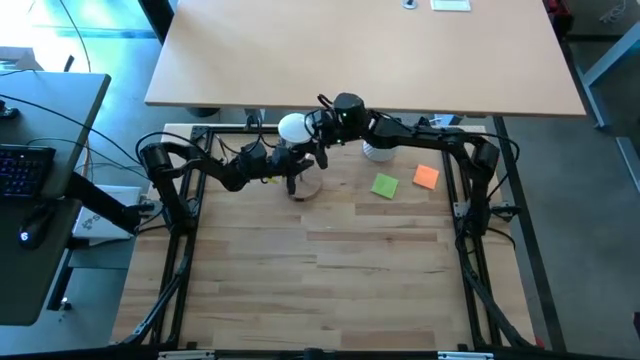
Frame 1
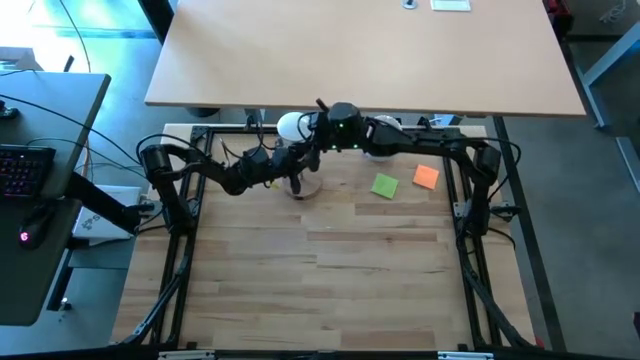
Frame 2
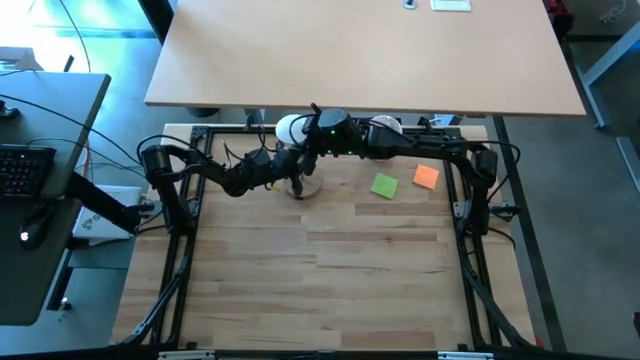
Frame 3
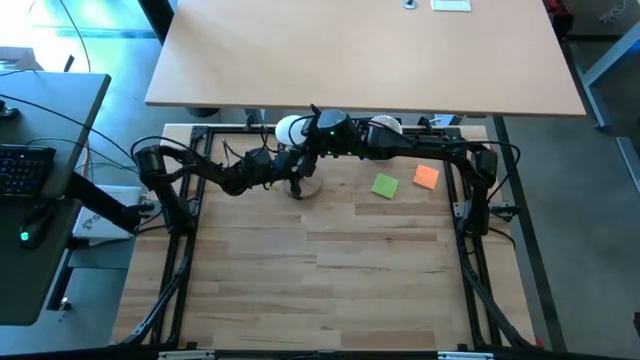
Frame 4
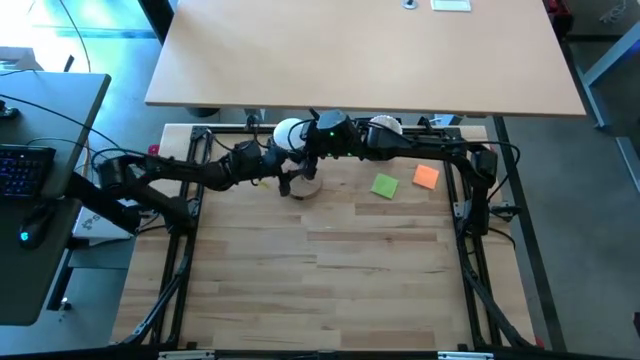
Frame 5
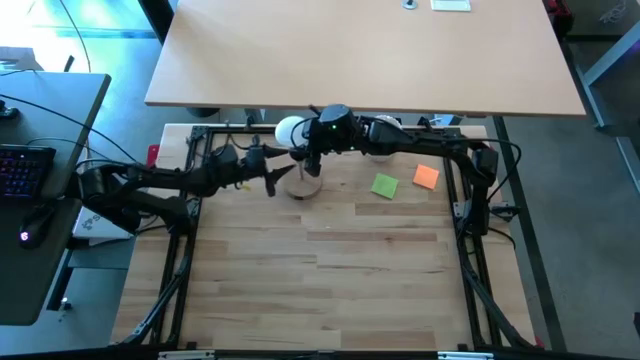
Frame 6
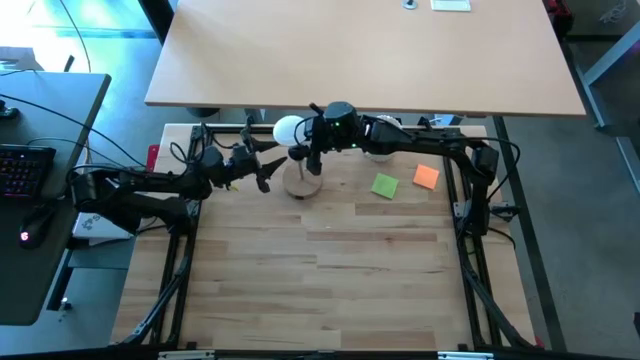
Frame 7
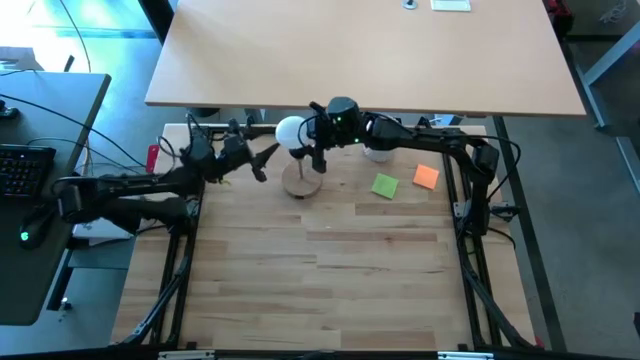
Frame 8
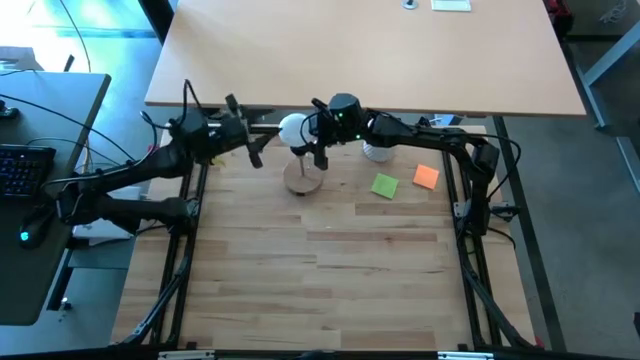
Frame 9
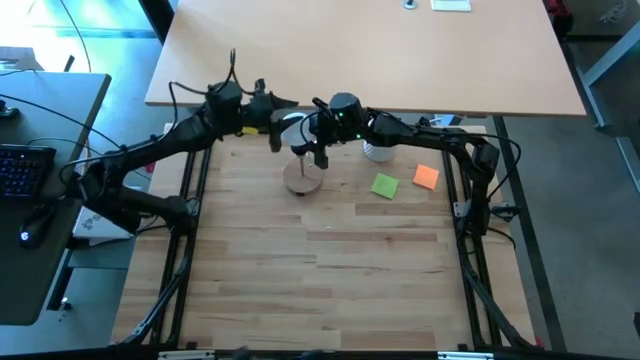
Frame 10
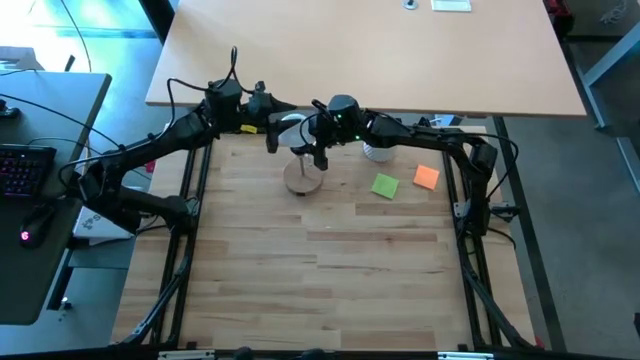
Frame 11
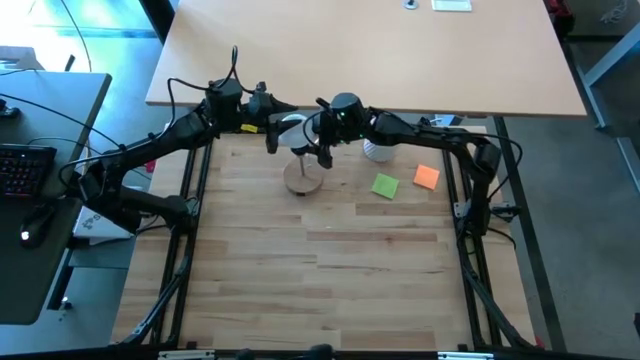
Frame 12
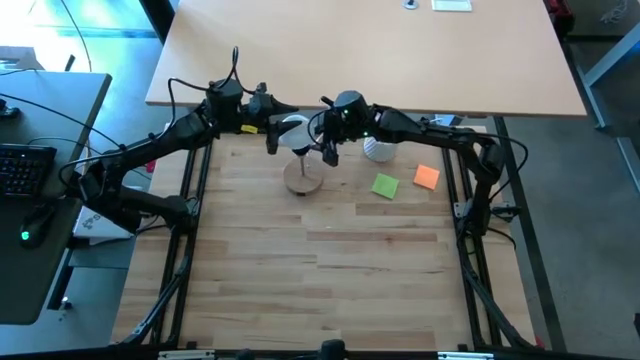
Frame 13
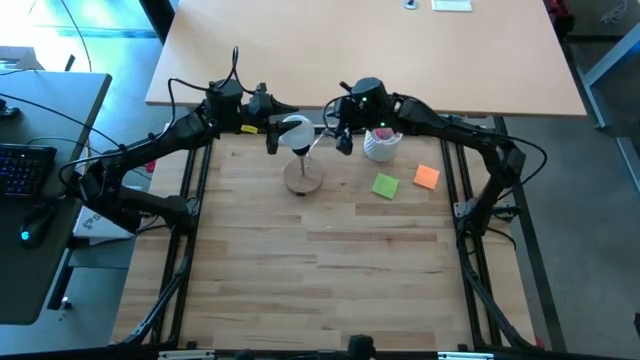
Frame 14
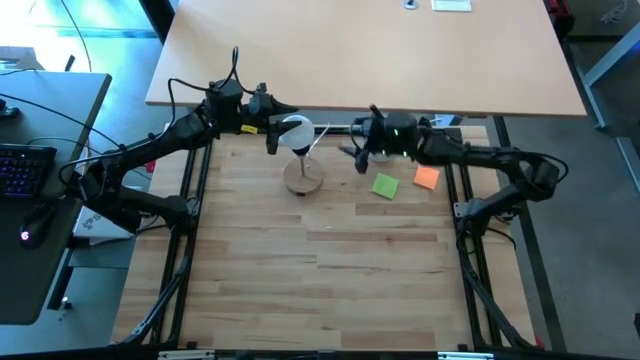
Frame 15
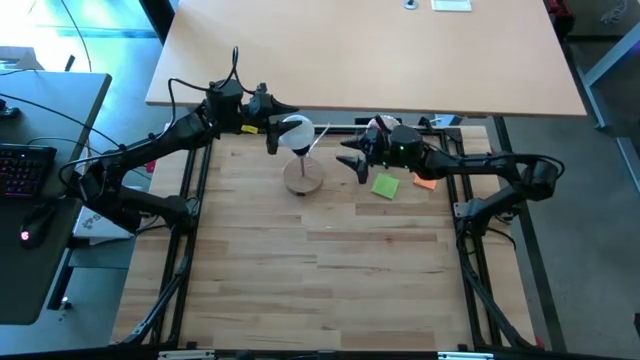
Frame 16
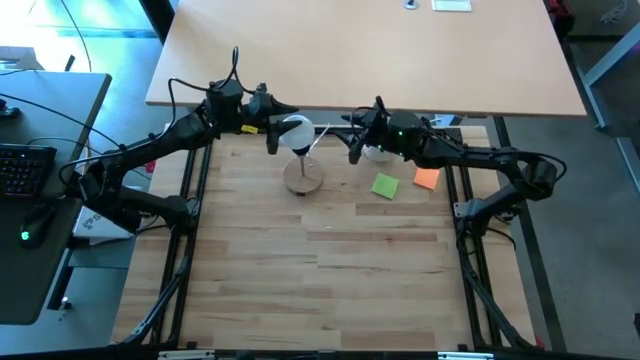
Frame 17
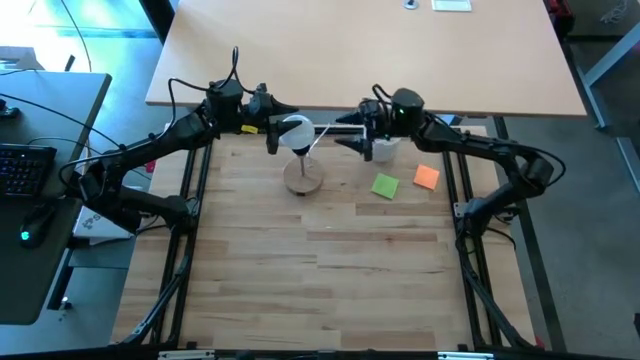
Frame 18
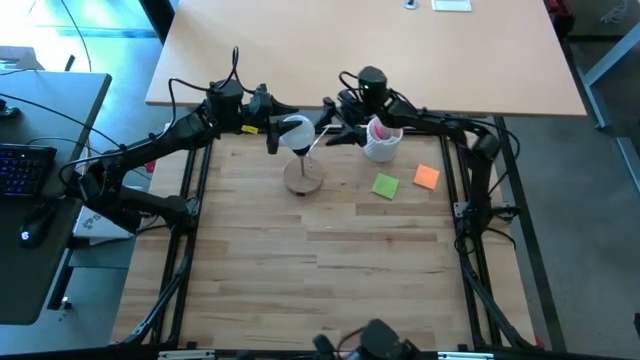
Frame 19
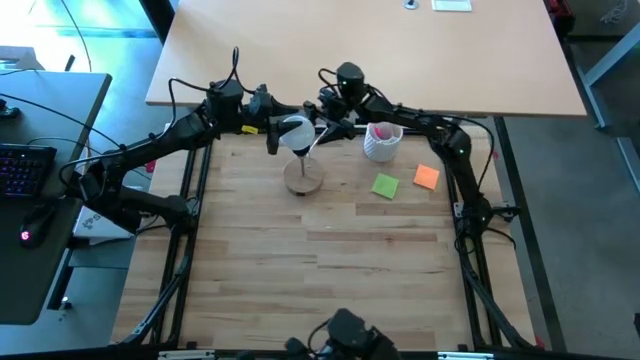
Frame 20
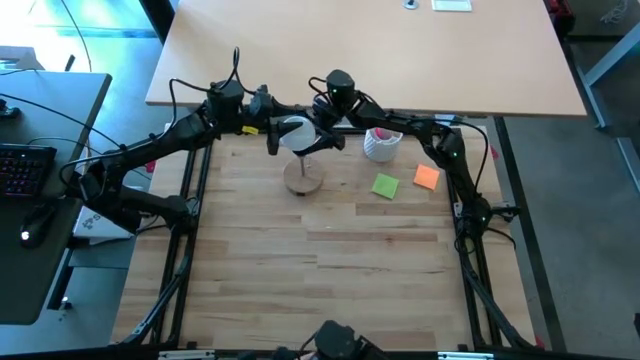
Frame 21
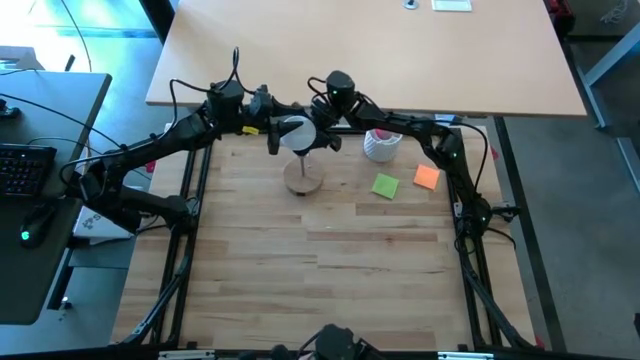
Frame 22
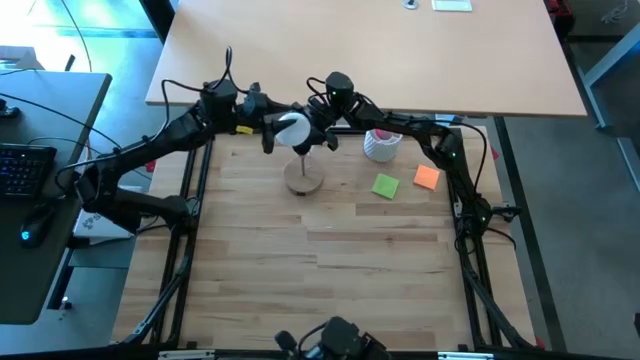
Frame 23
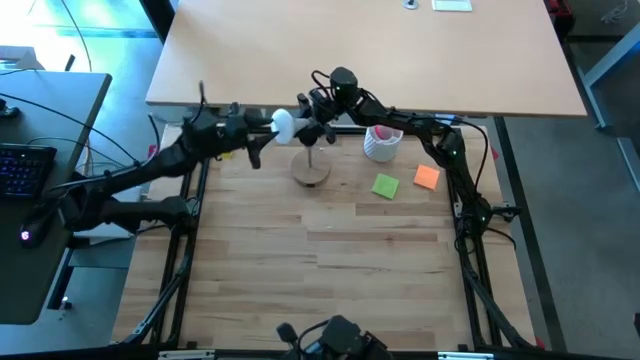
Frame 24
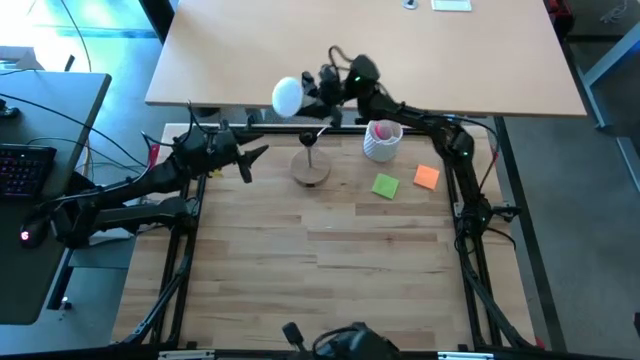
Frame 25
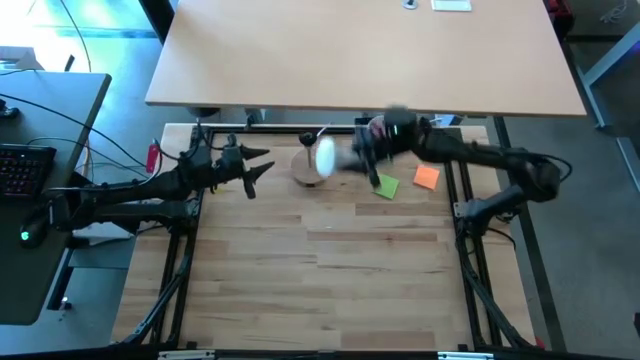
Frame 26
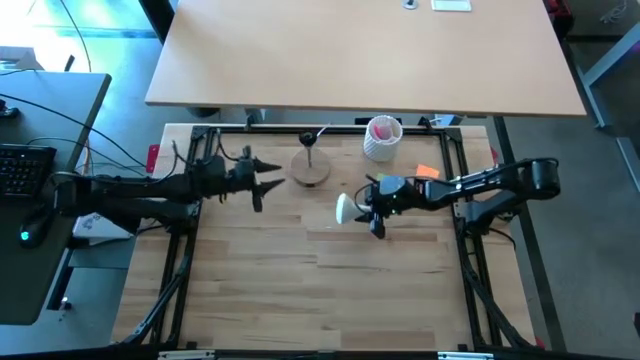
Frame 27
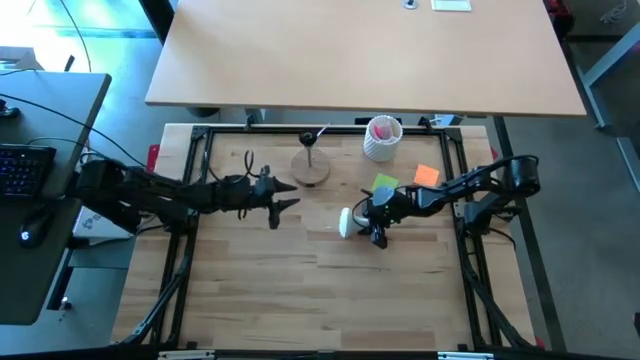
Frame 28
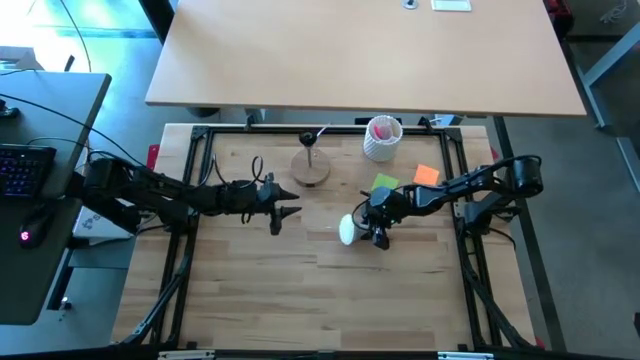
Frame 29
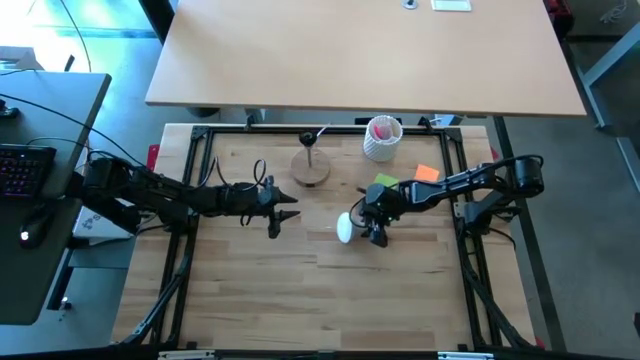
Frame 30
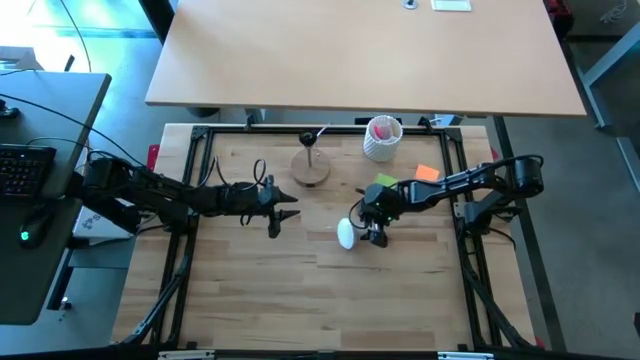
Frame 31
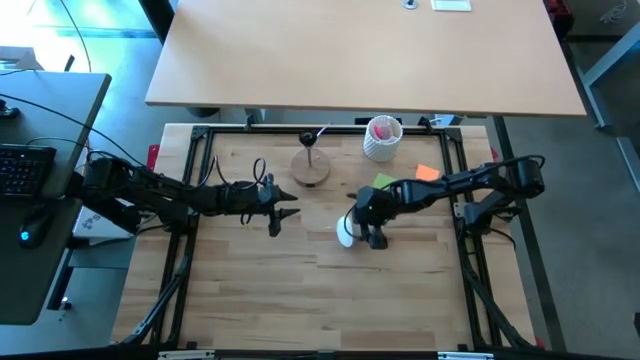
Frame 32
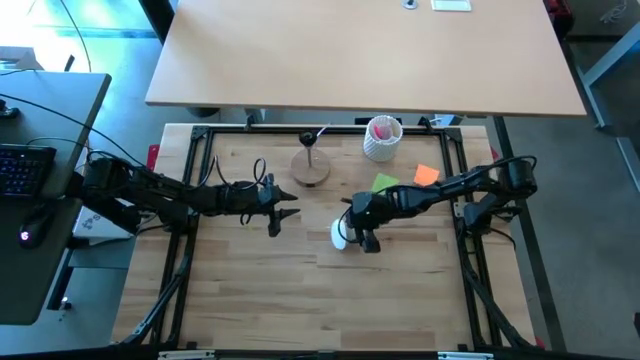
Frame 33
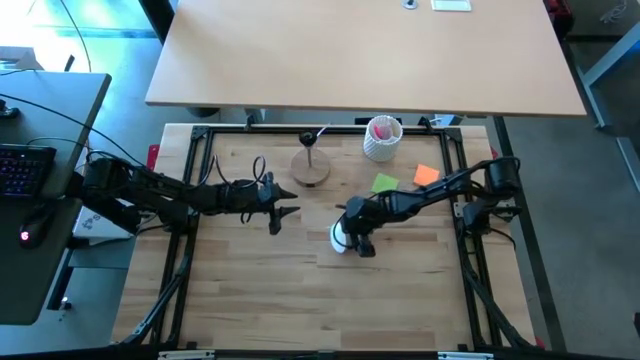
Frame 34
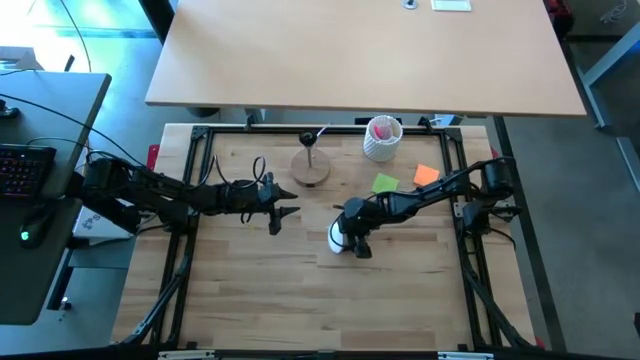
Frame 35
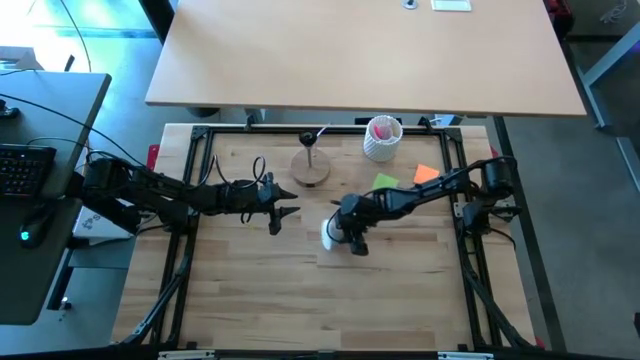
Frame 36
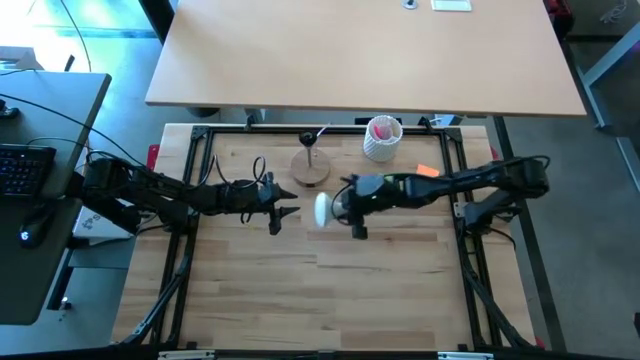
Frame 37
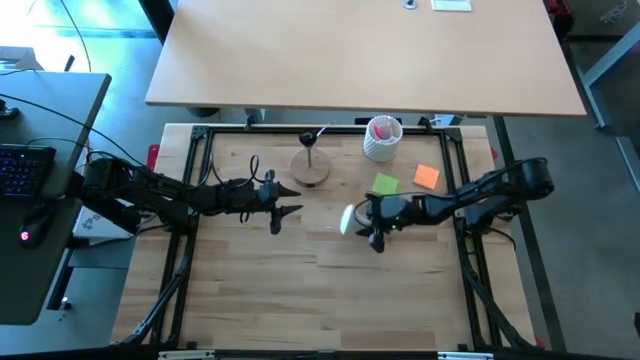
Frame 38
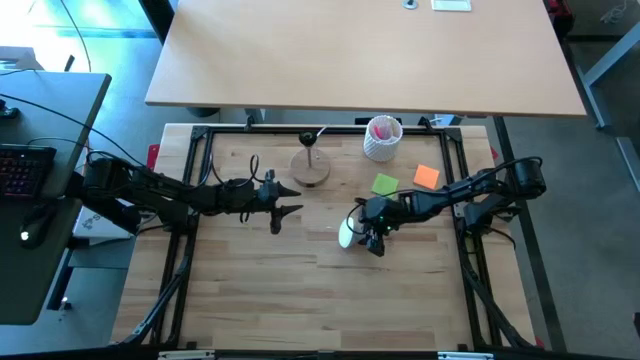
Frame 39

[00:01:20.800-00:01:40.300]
Task: Screw lightbulb
Insert the lightbulb into the lamp socket

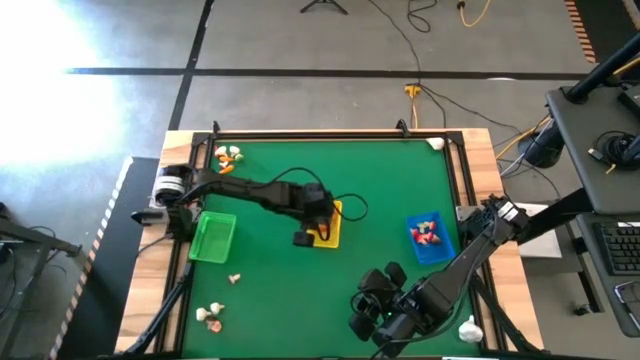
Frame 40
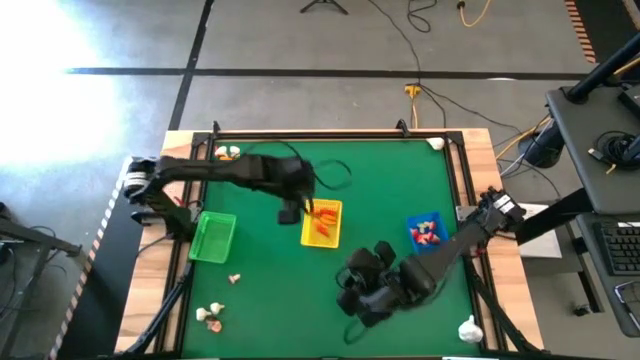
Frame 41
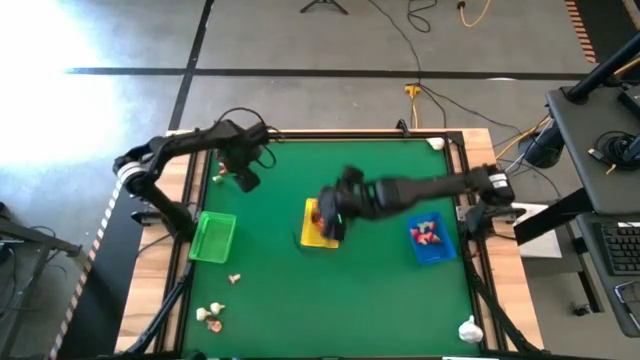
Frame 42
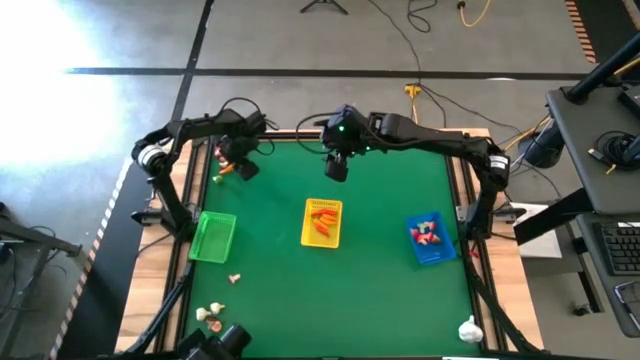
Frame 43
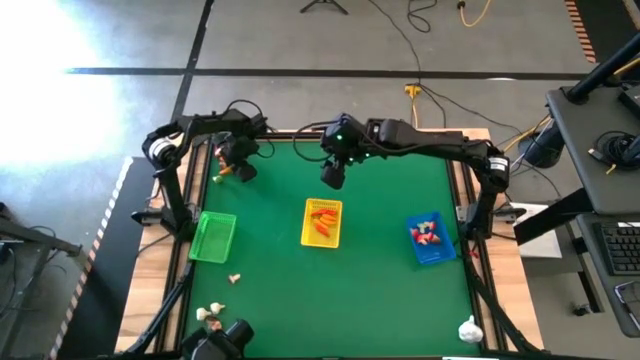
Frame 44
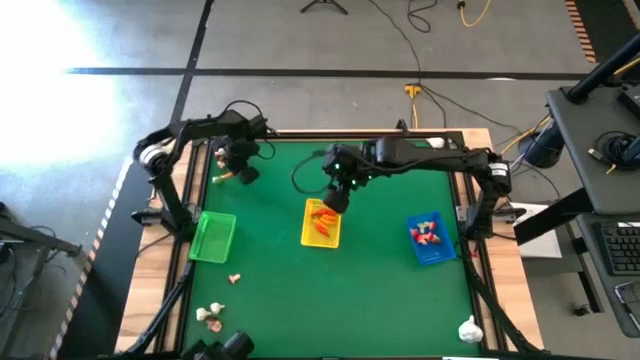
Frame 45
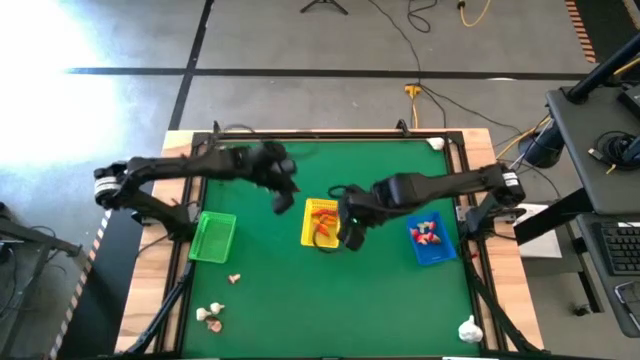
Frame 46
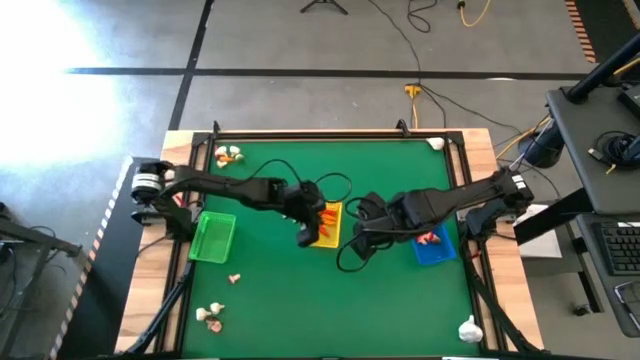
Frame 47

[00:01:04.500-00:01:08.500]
Task: Sort produce into baskets
Put the yellow chili pepper into the yellow bin
